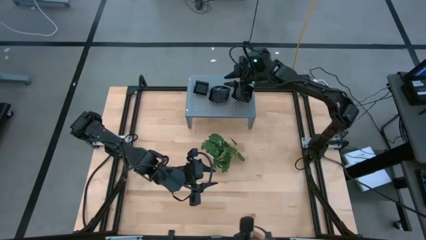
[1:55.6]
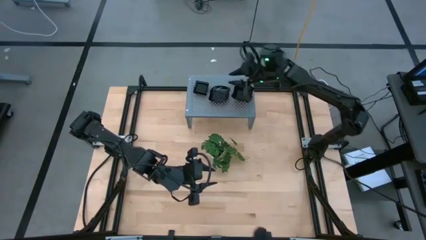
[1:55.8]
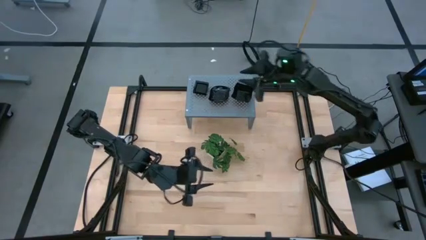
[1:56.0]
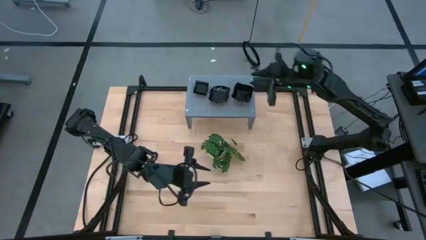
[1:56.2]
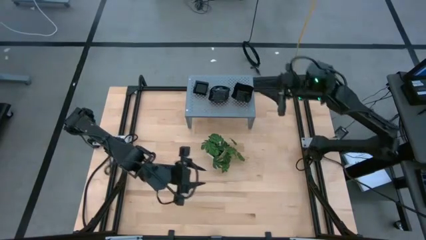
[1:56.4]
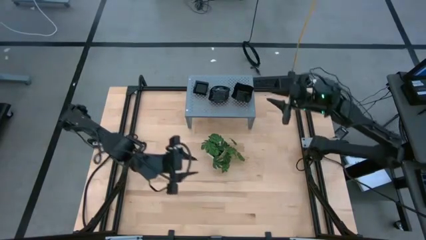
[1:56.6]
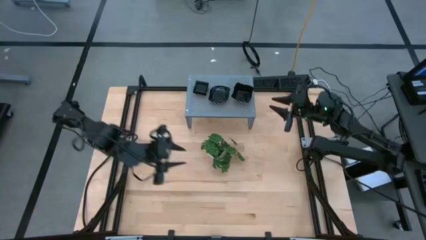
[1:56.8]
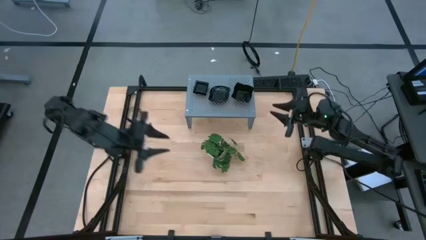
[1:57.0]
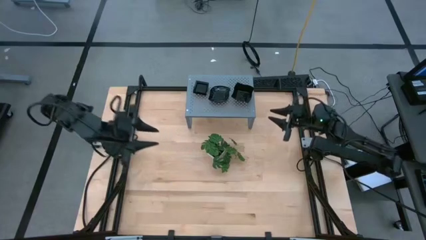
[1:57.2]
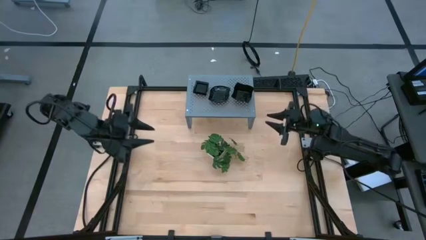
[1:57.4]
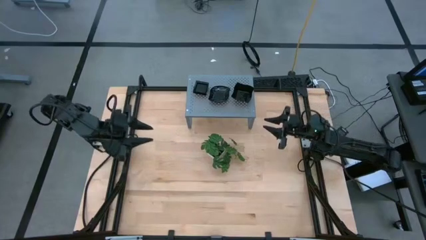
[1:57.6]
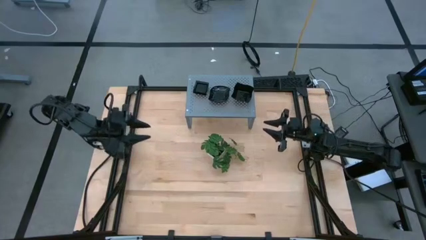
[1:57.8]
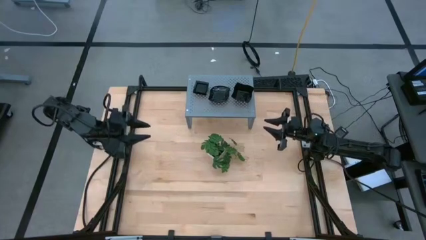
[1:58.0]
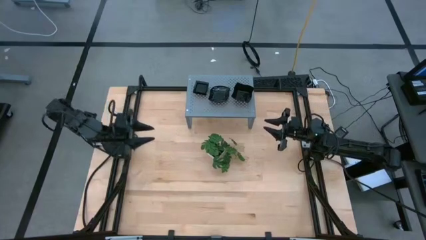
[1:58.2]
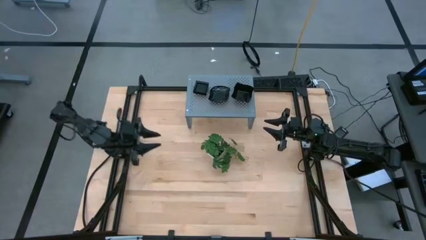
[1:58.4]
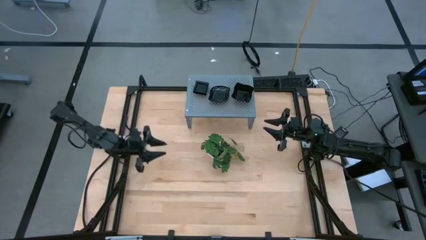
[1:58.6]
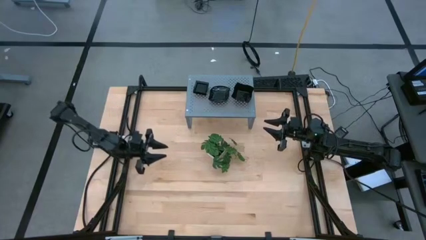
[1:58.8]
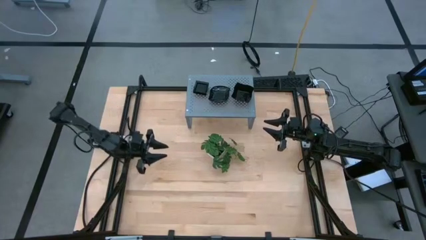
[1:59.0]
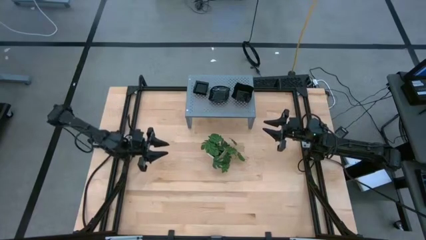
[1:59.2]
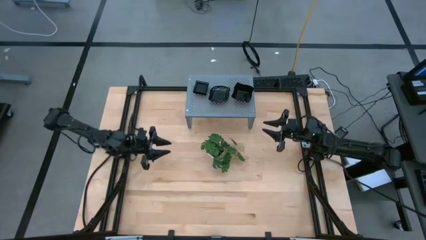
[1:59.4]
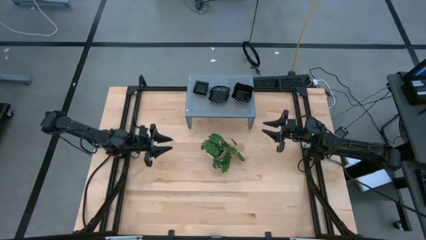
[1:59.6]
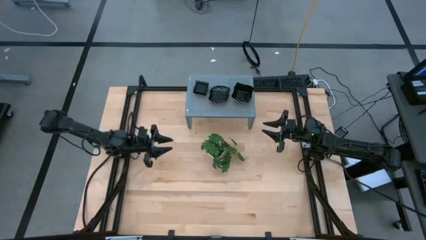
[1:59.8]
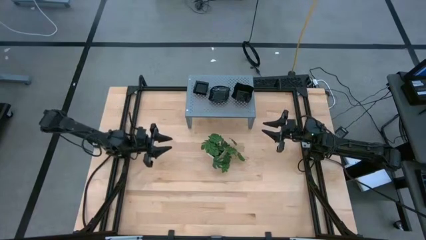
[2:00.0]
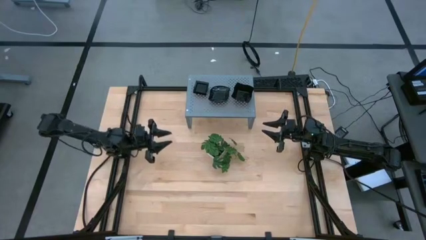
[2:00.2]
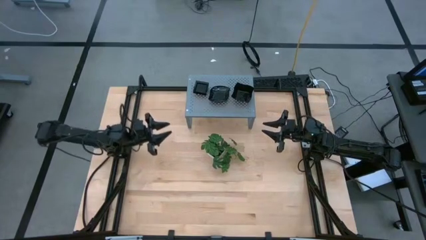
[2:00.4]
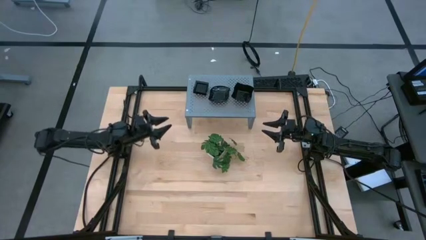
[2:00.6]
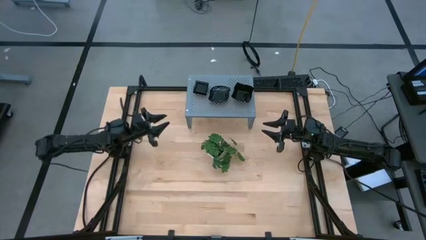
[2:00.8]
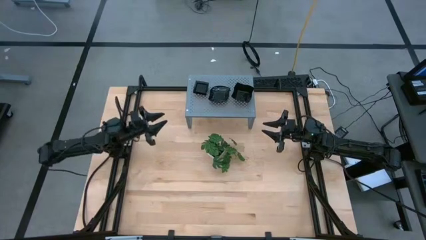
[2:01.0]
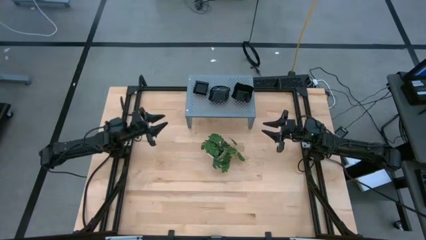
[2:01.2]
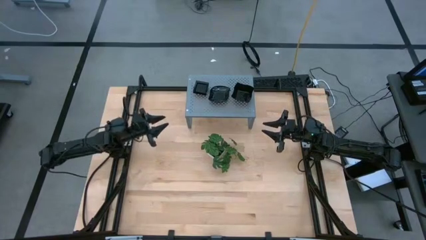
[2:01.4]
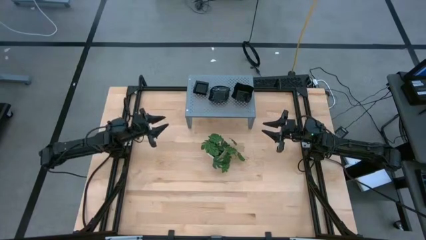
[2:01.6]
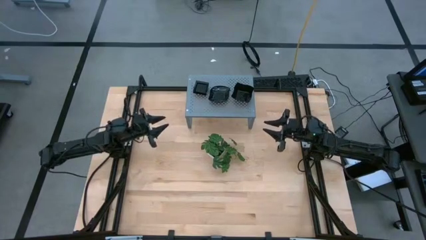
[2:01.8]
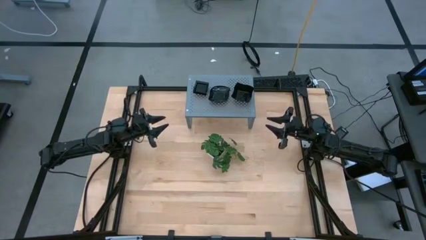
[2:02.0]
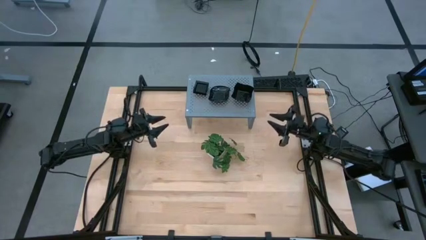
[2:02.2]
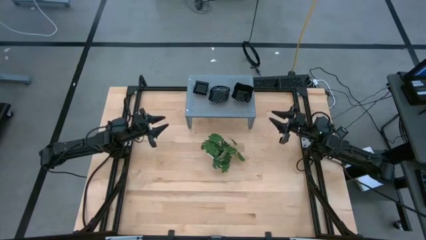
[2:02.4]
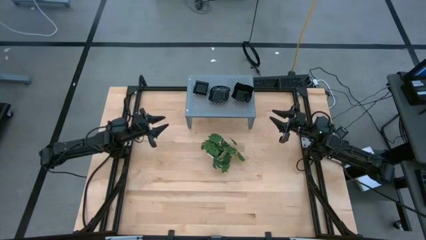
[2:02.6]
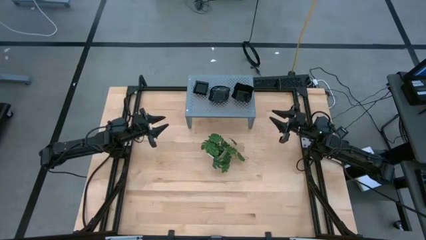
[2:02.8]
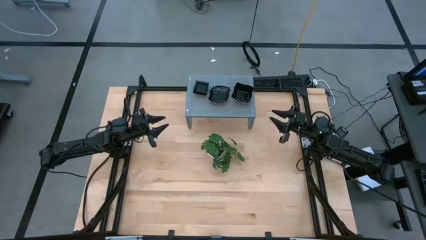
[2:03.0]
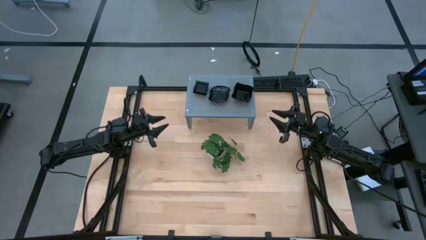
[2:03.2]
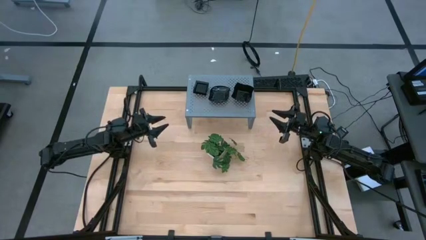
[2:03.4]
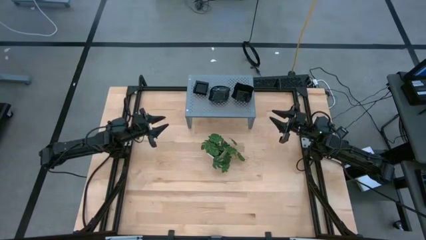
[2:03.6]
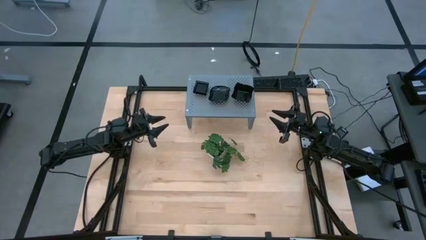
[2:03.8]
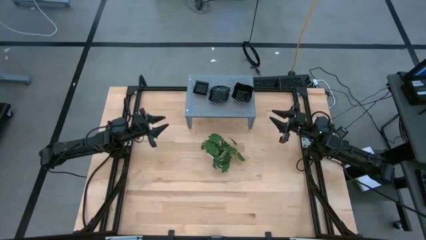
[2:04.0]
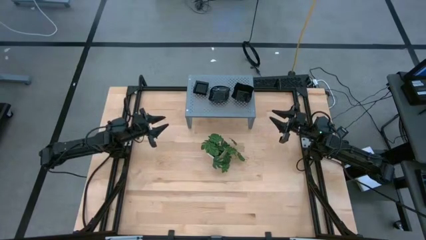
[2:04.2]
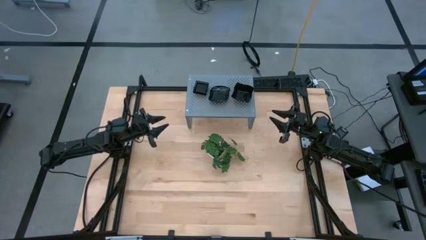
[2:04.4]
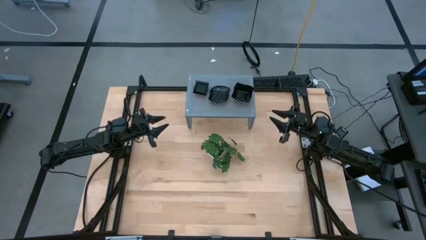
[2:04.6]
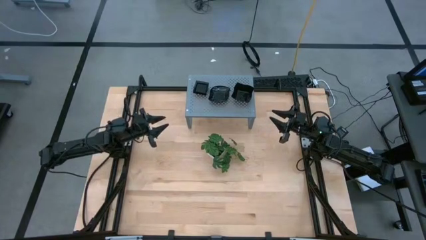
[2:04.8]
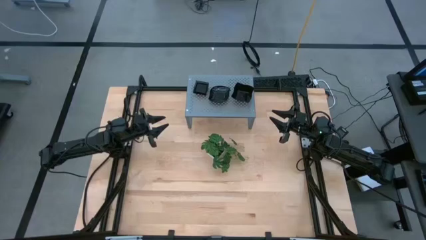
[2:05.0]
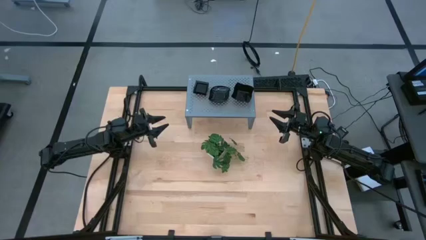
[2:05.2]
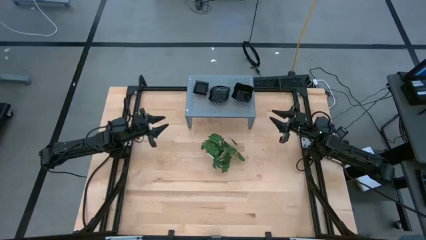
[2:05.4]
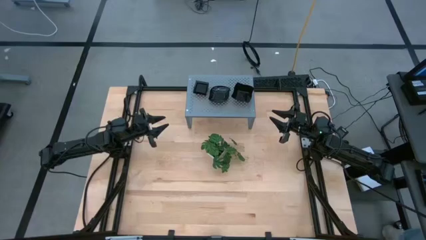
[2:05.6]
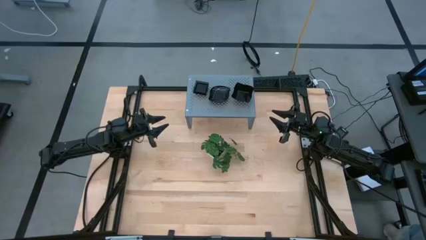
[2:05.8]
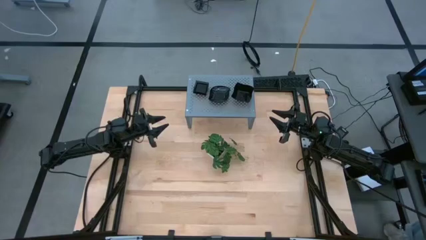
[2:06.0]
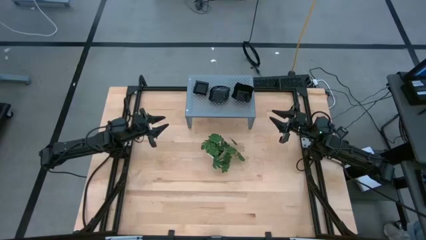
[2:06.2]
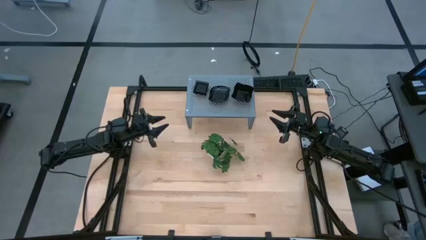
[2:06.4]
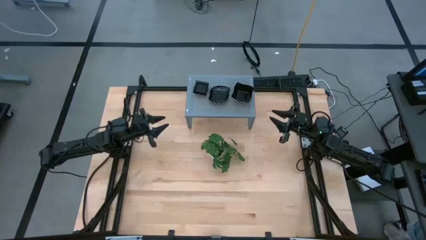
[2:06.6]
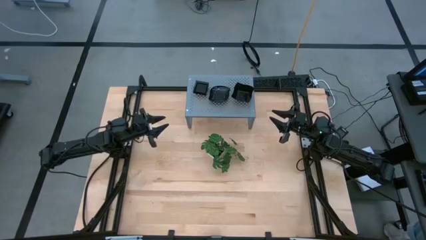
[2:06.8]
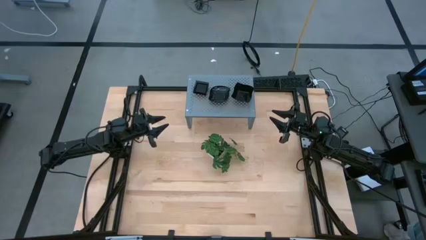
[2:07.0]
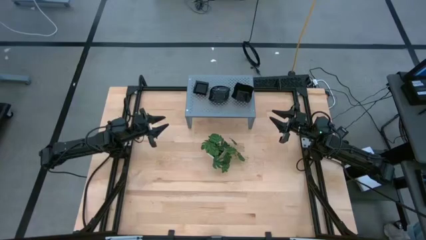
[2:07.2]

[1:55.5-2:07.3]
Task: Pick & Place Mini shaped plates
Return to Home Position

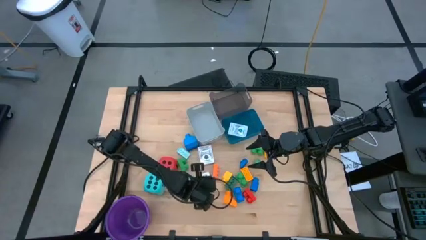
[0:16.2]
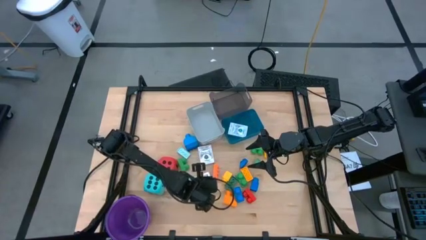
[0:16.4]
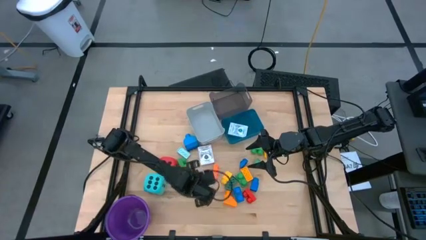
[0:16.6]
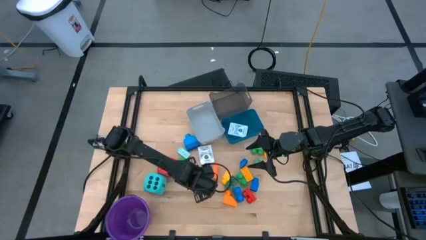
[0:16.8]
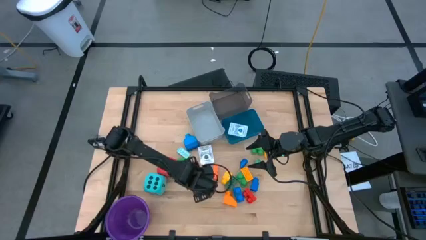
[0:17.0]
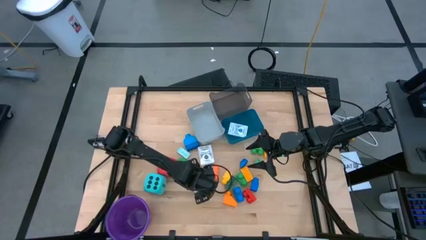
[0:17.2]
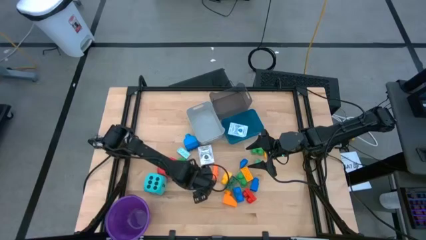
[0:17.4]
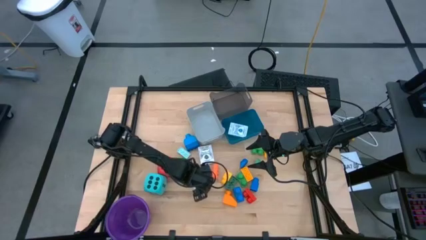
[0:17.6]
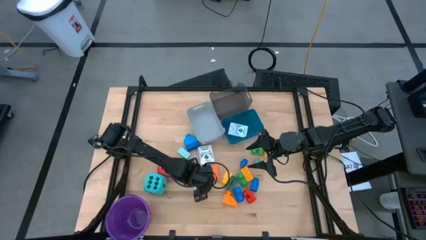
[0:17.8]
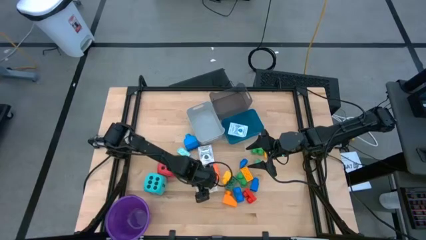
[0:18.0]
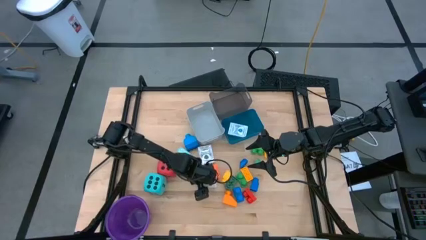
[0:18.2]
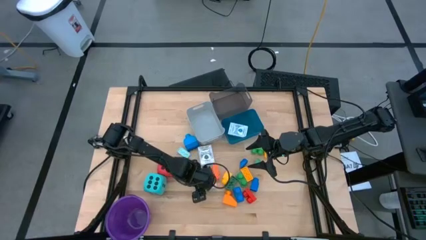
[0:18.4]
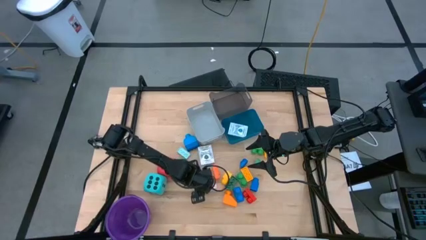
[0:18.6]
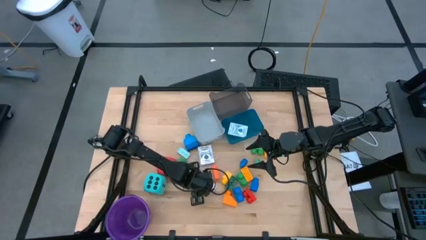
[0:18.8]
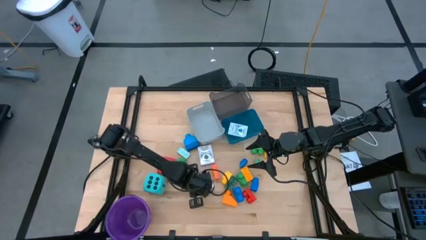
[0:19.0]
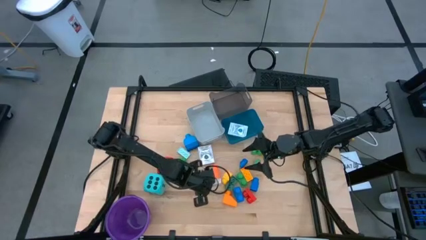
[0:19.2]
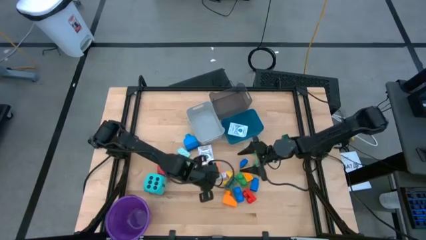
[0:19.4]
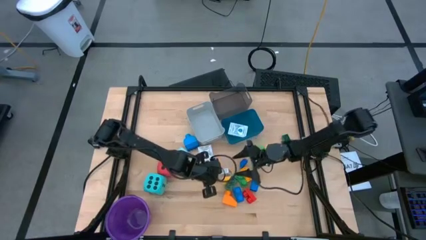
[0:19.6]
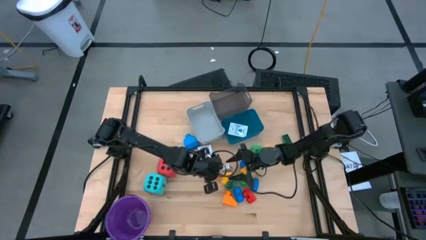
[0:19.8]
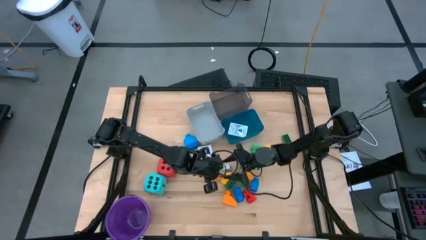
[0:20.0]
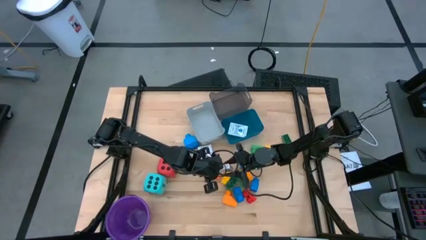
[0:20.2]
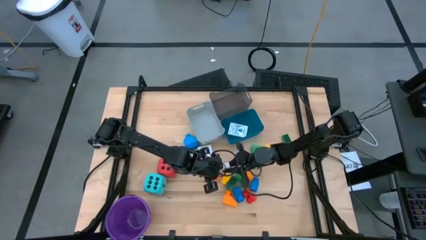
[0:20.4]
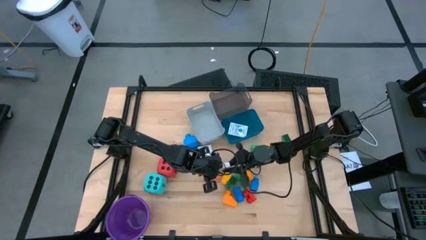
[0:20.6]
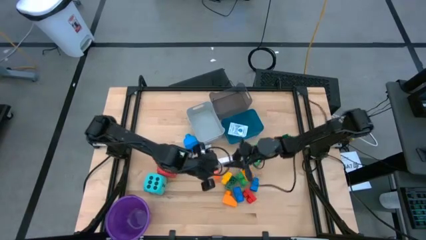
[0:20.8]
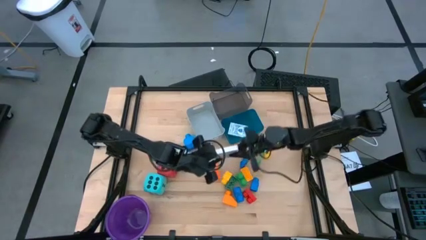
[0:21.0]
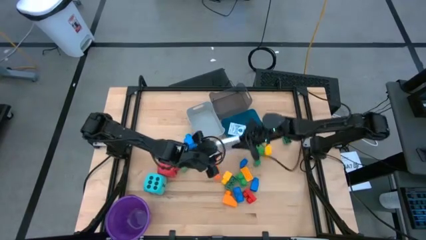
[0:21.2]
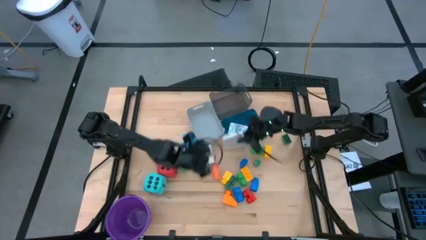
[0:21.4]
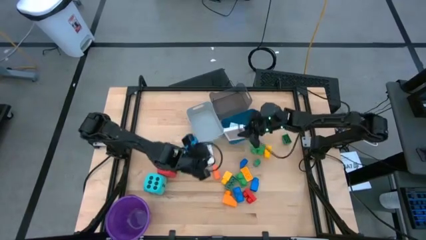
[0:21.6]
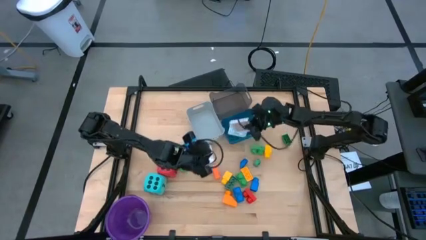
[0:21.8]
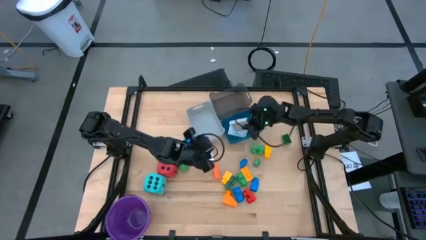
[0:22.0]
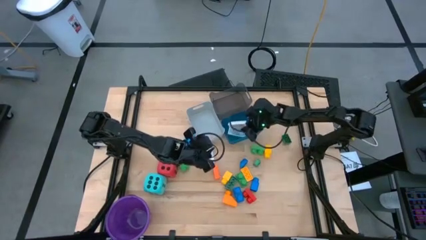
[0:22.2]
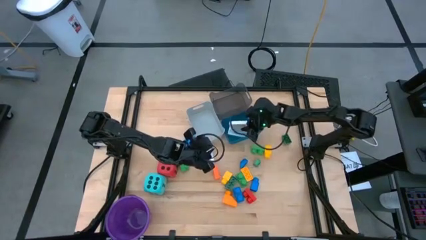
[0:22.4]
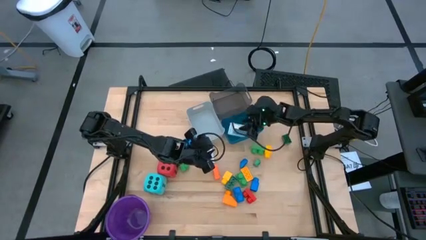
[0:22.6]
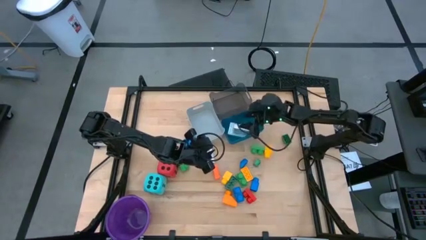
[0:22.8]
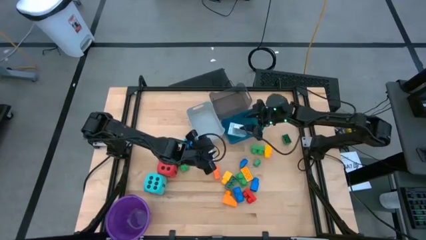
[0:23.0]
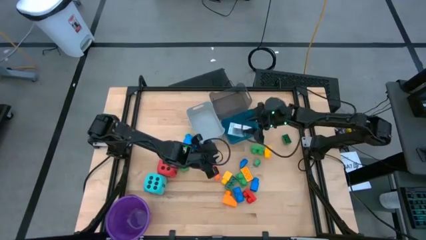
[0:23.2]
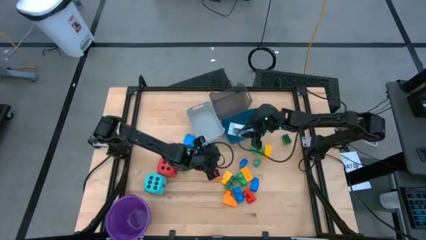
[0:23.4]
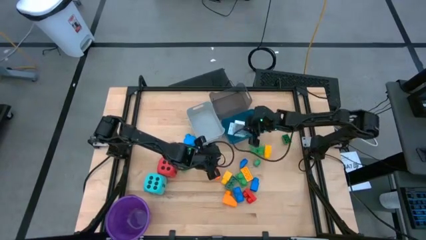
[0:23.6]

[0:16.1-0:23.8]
Task: Pick & Place Toys
Put the brown deck of cards into the blue bin
